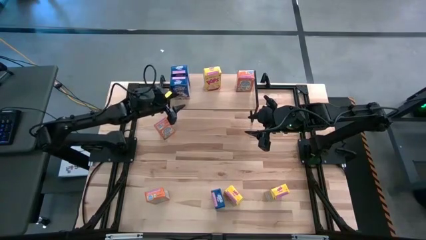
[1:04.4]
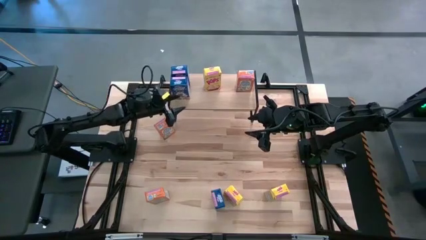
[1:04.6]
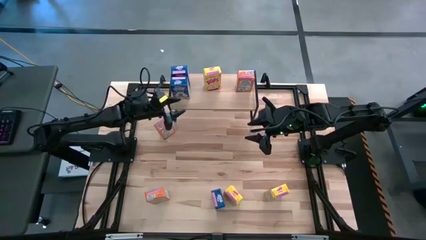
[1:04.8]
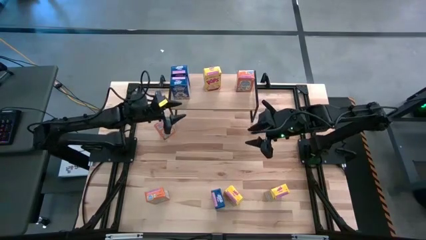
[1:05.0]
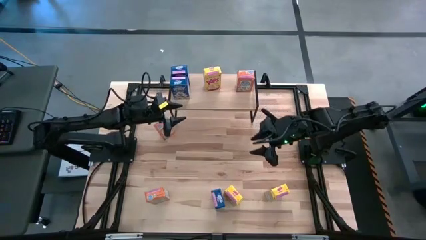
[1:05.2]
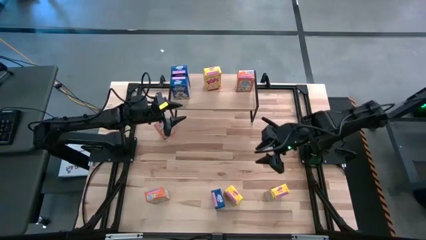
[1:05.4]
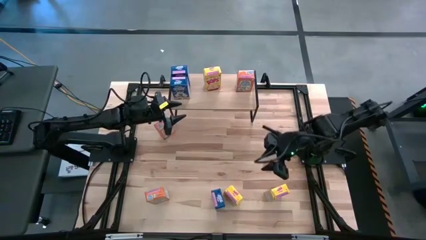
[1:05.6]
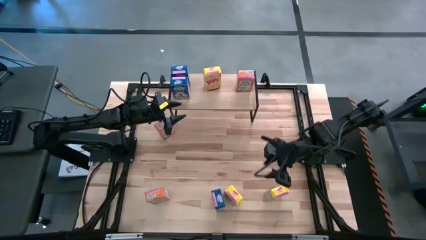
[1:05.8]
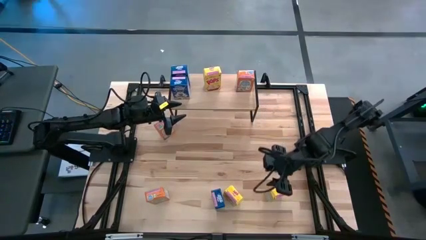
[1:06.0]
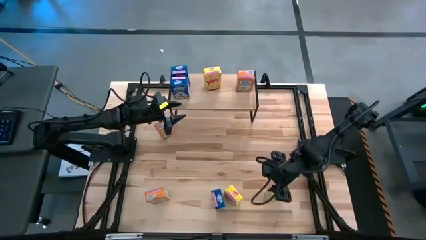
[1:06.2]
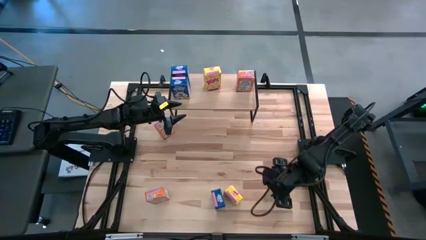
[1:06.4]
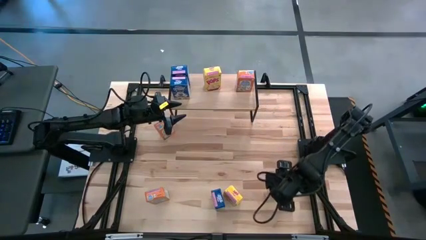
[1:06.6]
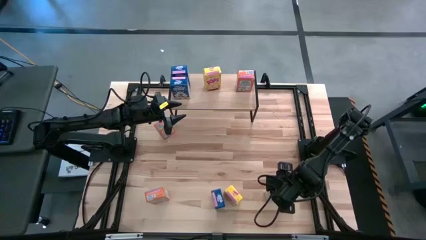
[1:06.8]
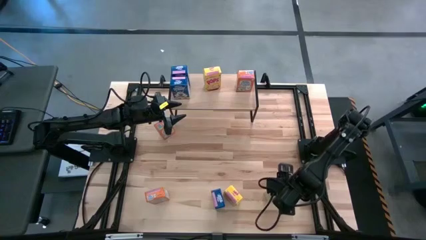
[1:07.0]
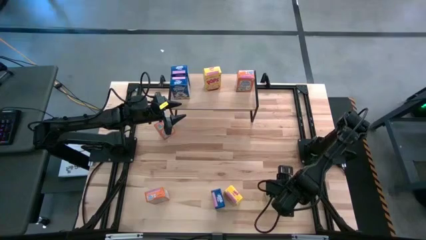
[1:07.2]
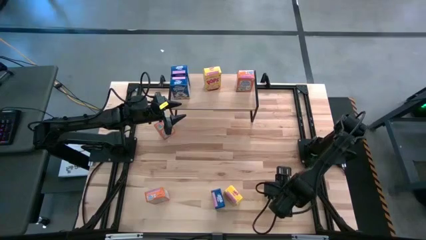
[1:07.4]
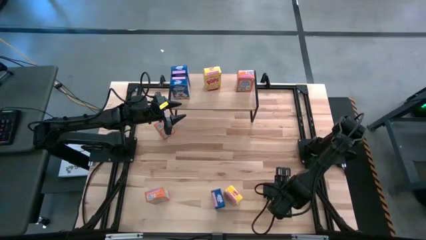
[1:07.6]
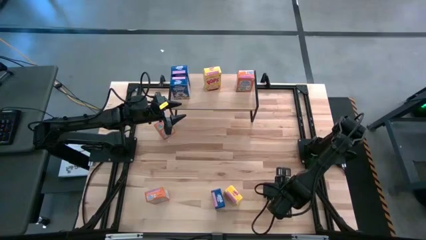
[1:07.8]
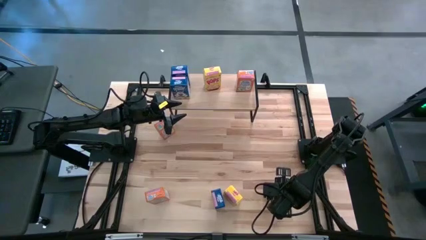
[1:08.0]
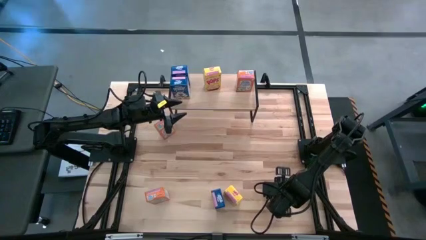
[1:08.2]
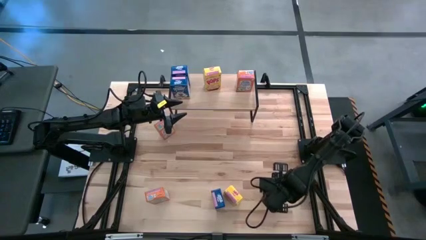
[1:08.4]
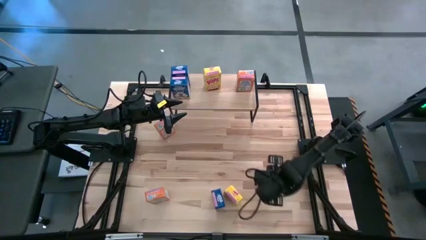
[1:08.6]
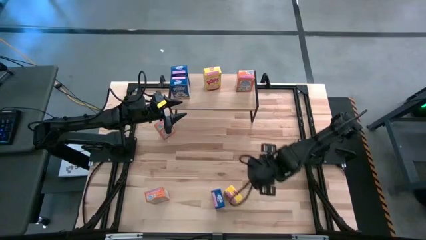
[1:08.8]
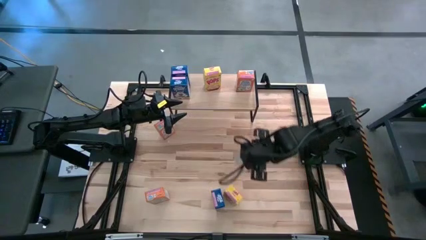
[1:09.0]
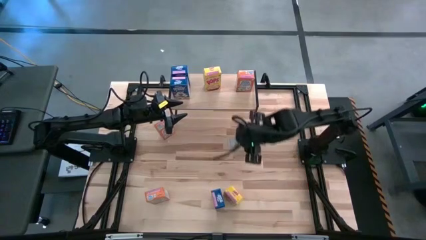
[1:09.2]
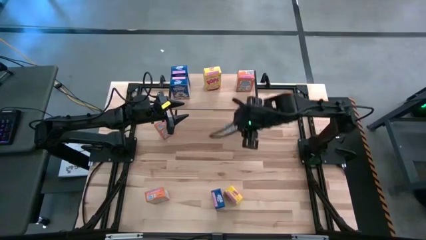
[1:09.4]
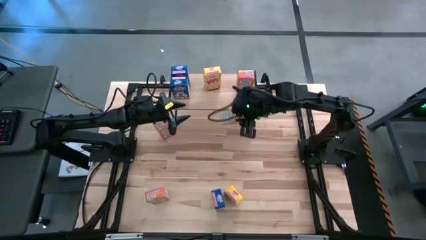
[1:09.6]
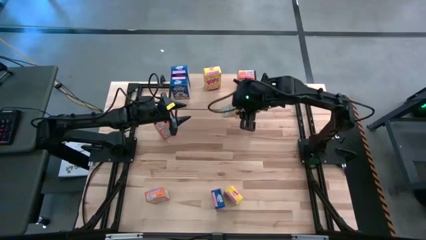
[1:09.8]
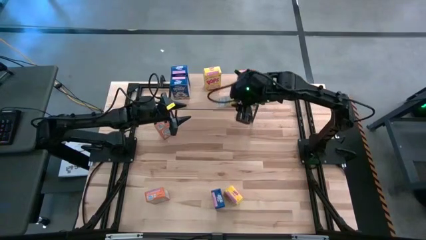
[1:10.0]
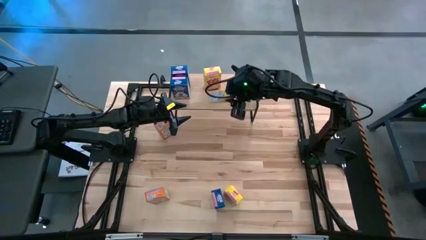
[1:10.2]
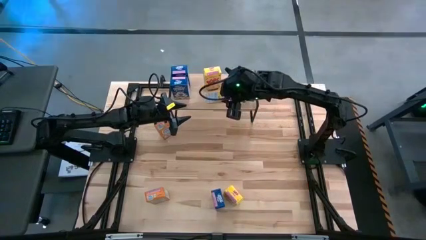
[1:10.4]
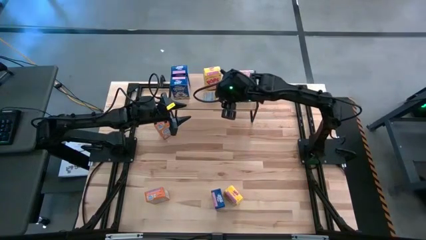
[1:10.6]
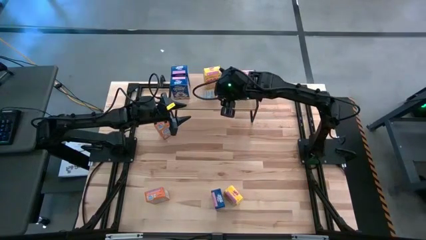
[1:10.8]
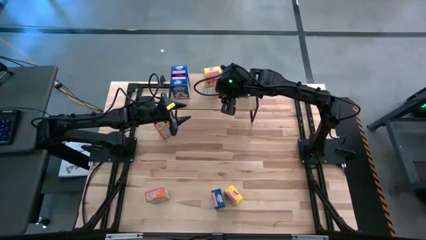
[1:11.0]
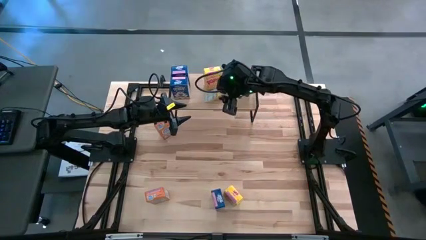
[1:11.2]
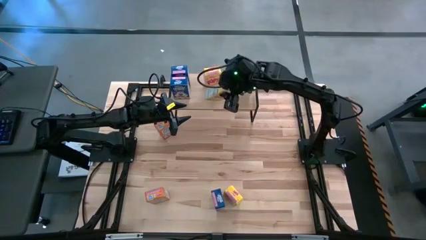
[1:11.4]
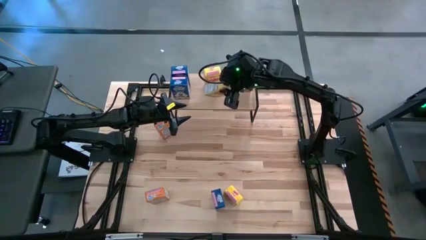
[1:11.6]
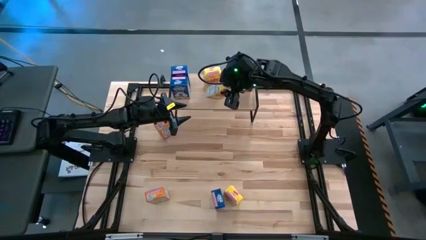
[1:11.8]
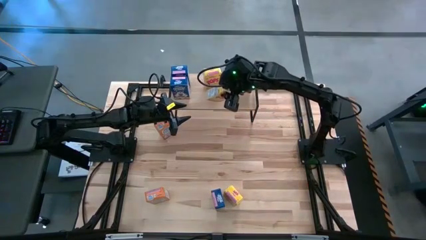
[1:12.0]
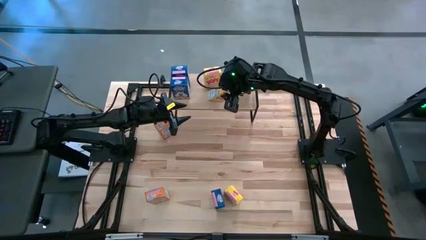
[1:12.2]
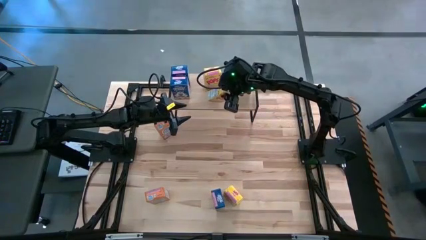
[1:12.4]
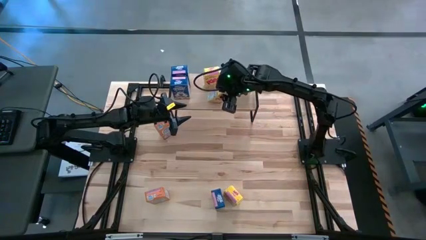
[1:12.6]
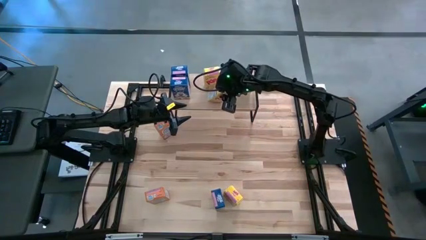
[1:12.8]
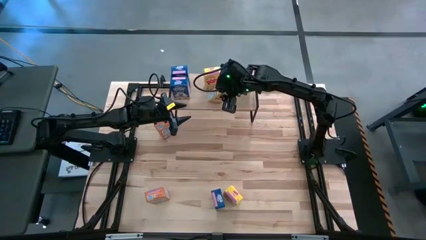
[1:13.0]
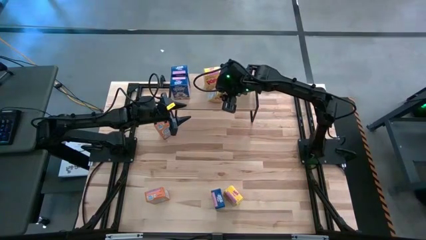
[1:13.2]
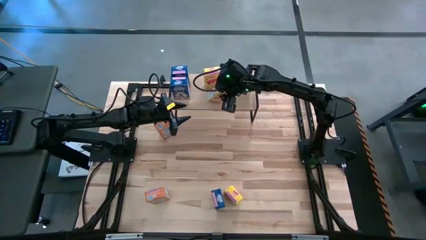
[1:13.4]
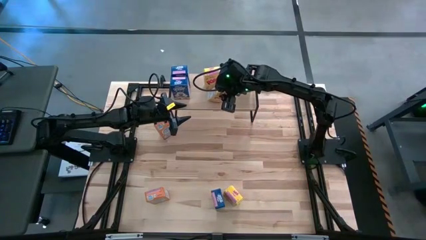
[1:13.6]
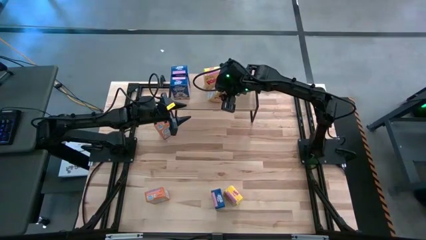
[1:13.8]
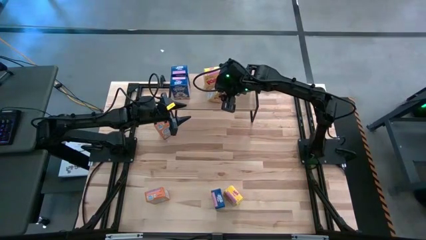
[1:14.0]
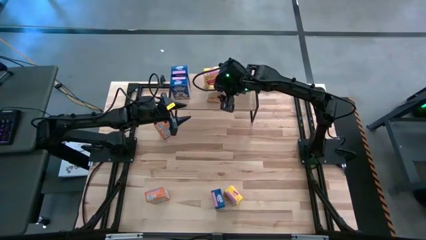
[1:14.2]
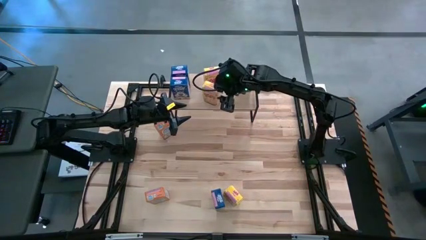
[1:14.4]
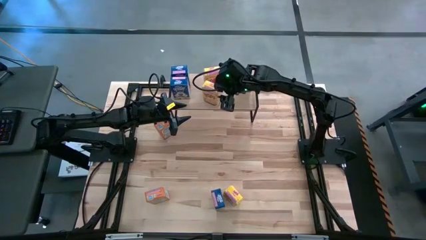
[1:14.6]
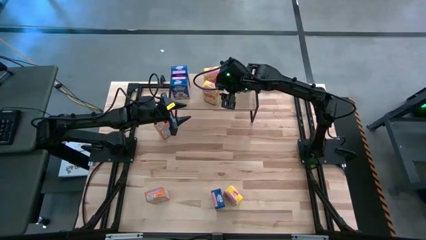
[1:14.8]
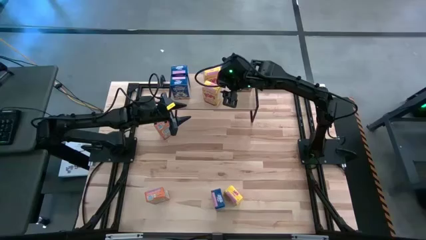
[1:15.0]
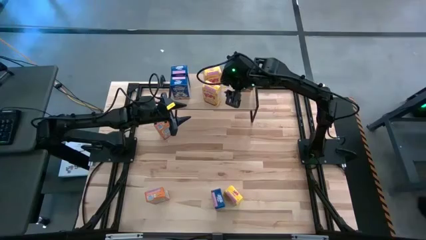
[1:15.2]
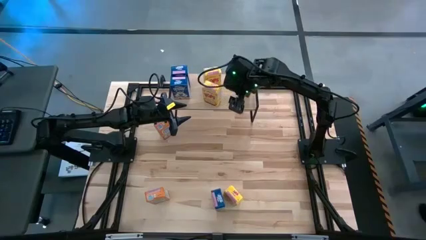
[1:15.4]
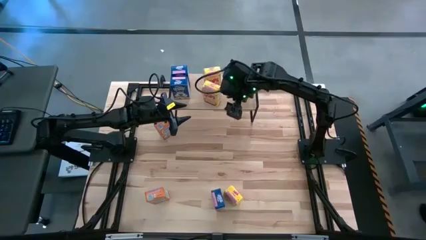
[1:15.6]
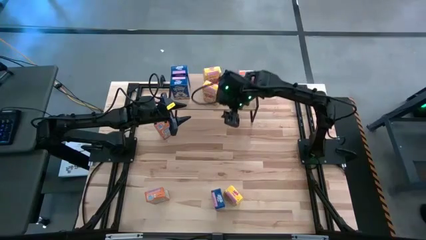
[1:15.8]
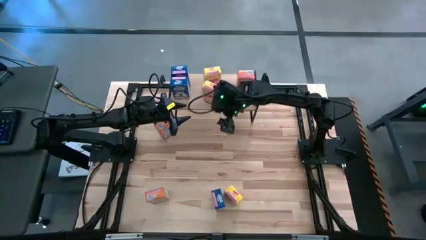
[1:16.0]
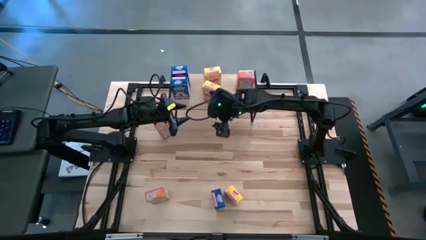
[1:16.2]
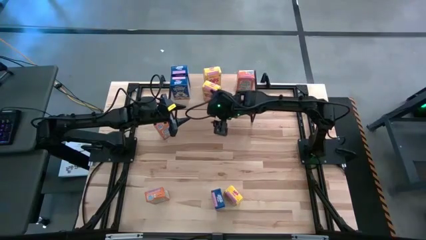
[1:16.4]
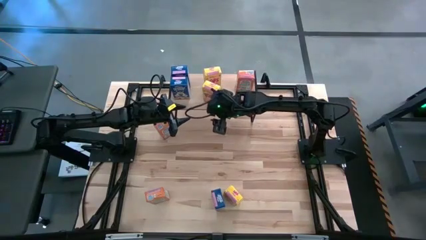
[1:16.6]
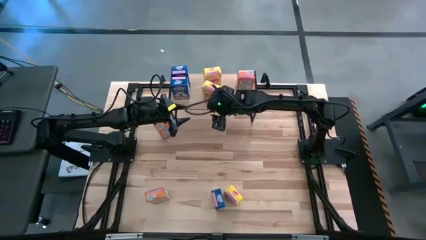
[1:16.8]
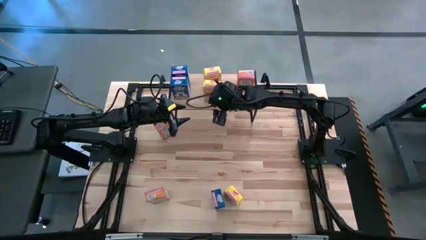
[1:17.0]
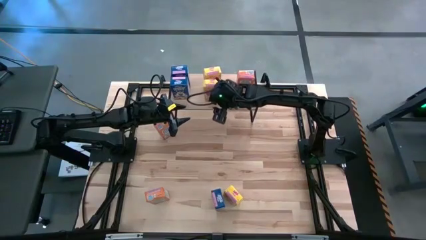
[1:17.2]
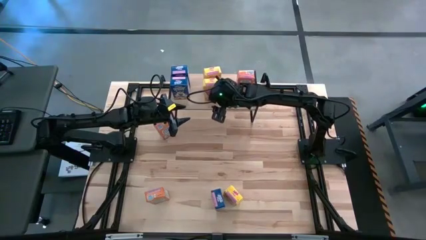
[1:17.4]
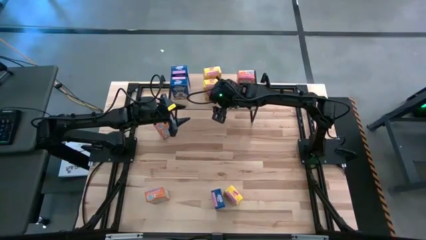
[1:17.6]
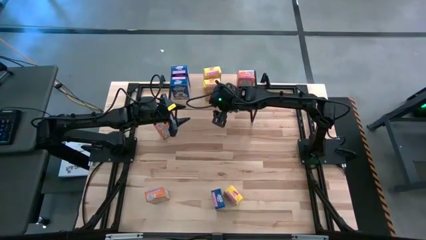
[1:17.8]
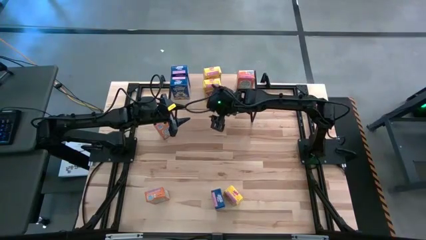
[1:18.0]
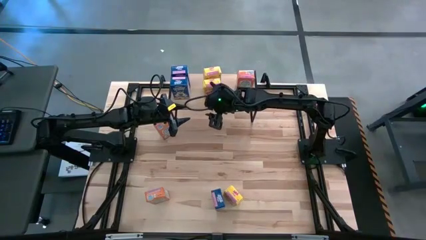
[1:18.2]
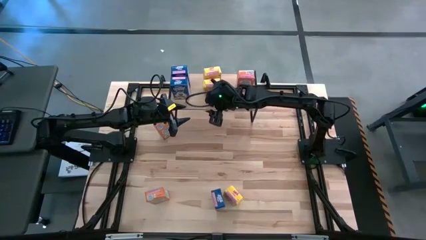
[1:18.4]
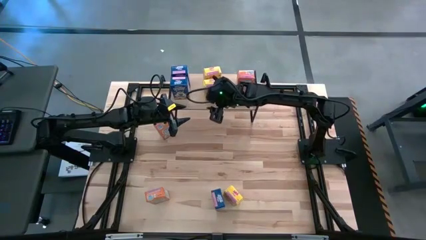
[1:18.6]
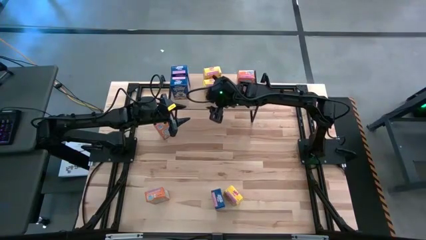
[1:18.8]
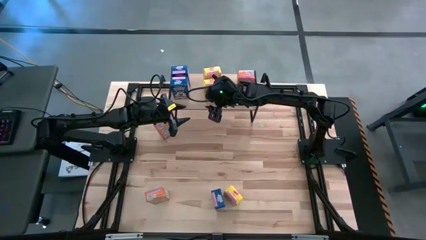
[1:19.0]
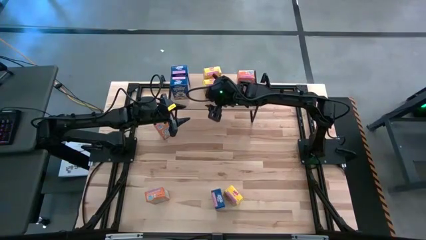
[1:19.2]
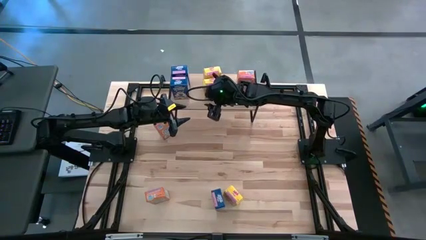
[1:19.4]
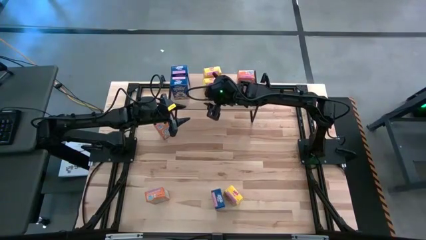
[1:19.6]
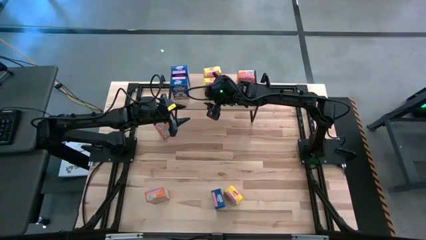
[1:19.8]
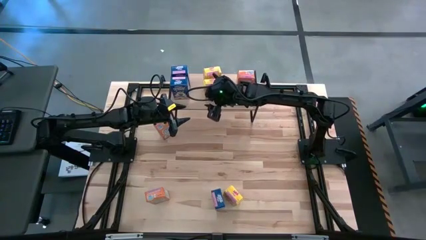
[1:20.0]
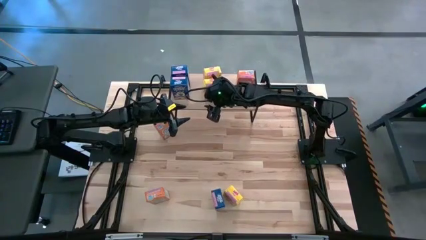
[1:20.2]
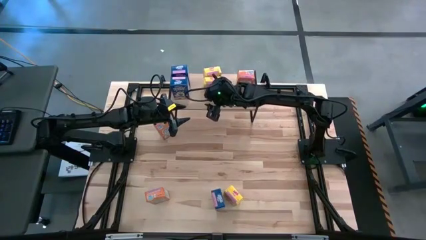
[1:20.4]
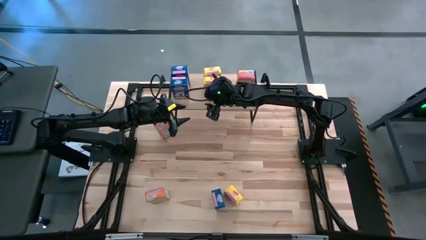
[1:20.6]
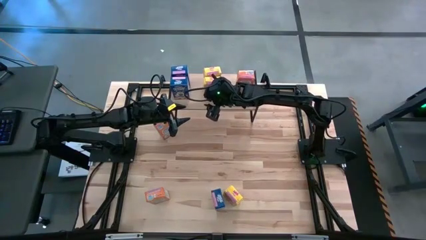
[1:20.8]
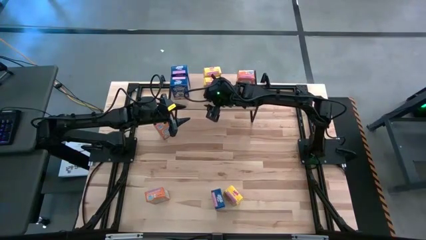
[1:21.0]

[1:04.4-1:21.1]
Task: Stack cereal on shelf
Put the right yellow cereal box on the shelf
